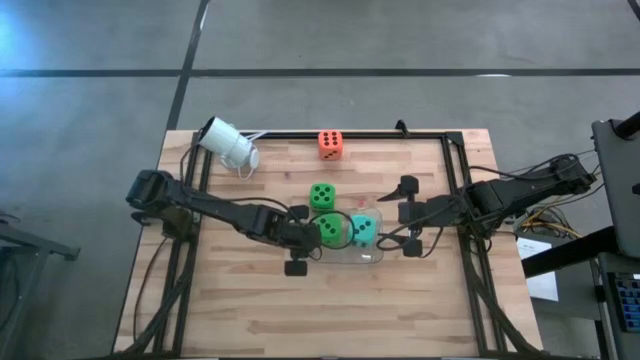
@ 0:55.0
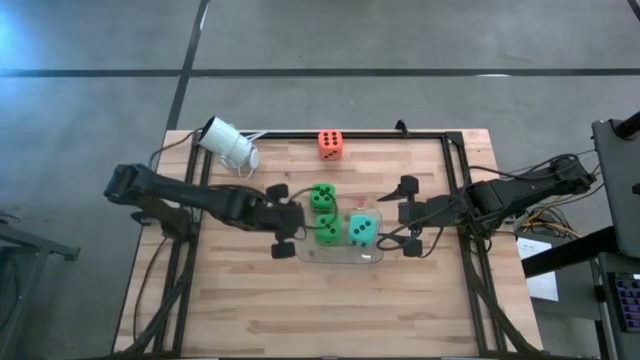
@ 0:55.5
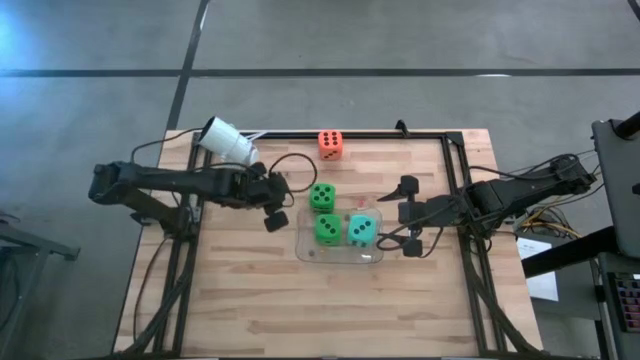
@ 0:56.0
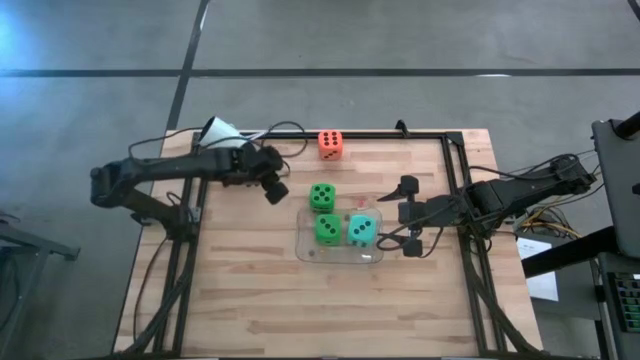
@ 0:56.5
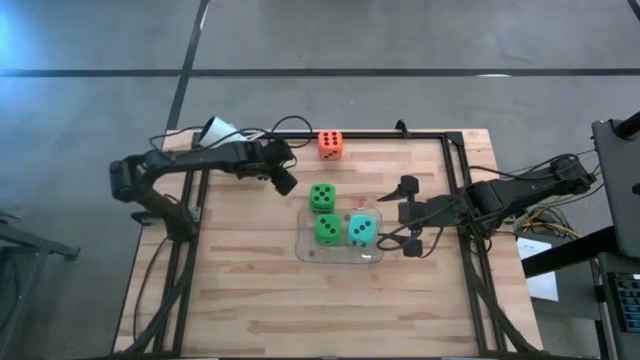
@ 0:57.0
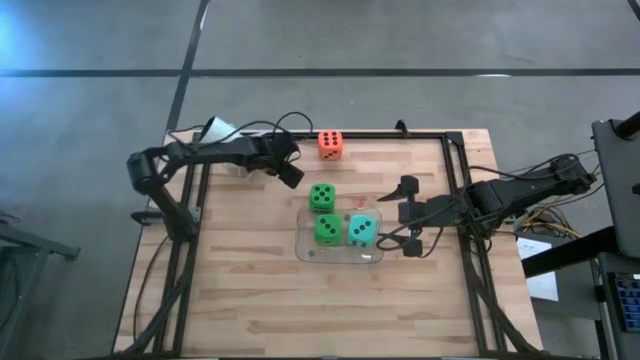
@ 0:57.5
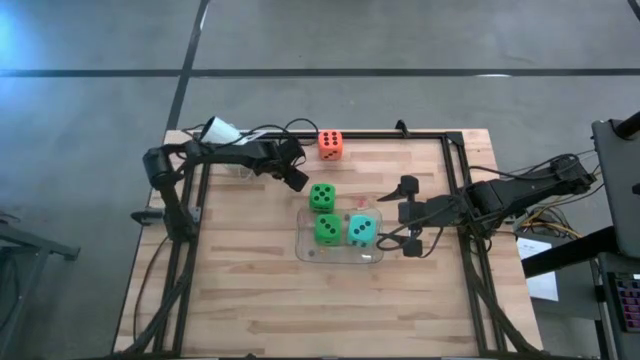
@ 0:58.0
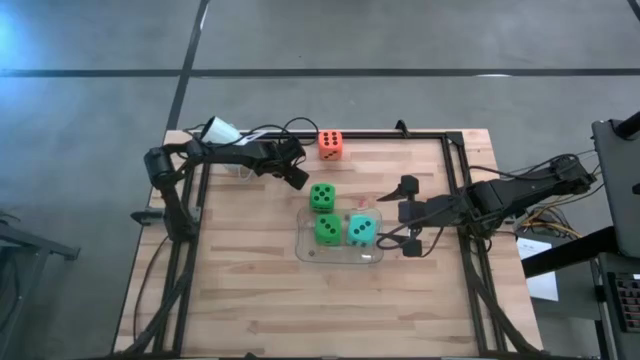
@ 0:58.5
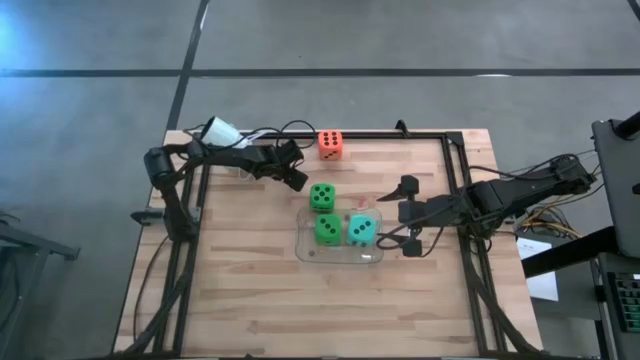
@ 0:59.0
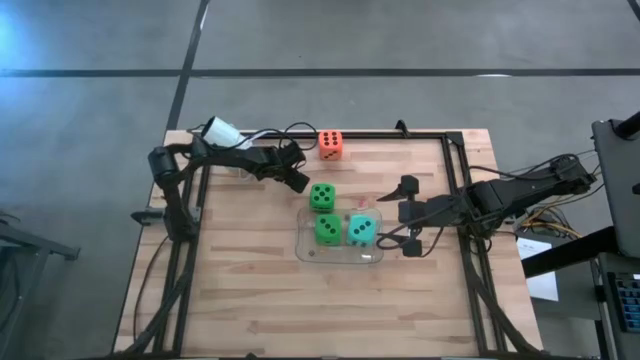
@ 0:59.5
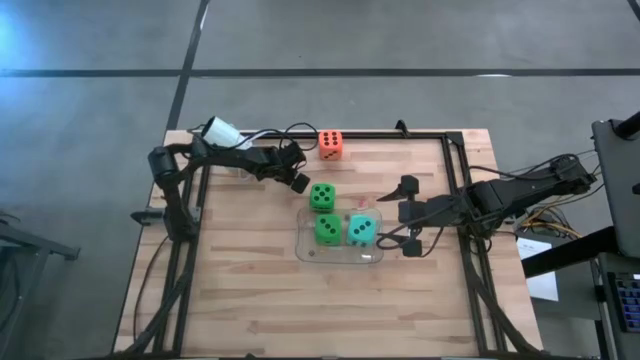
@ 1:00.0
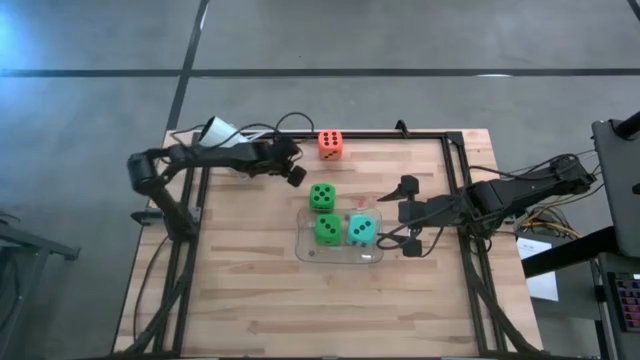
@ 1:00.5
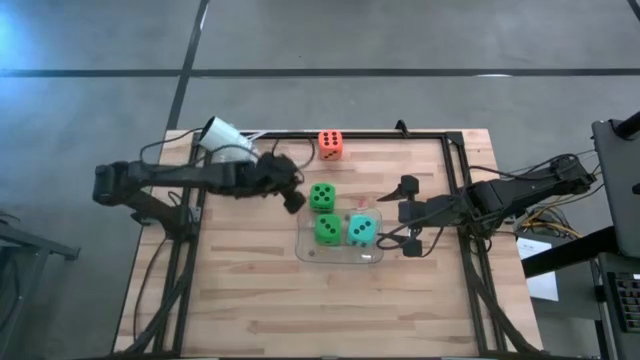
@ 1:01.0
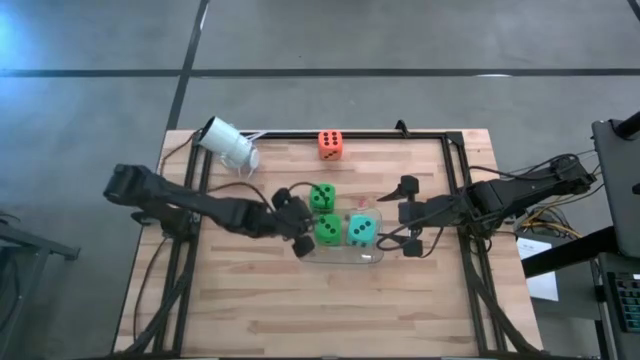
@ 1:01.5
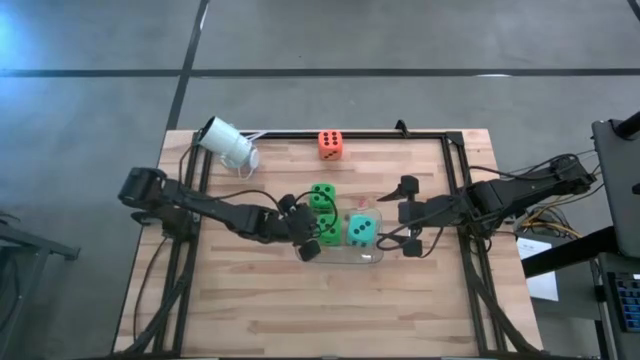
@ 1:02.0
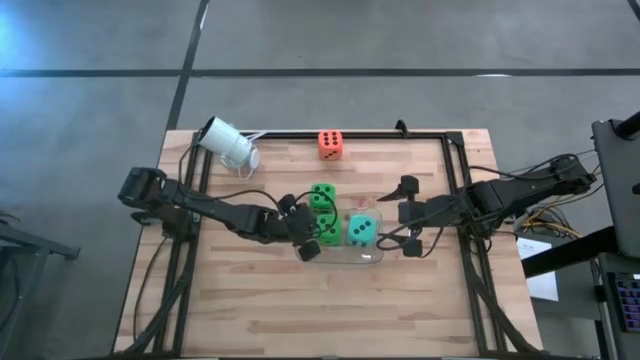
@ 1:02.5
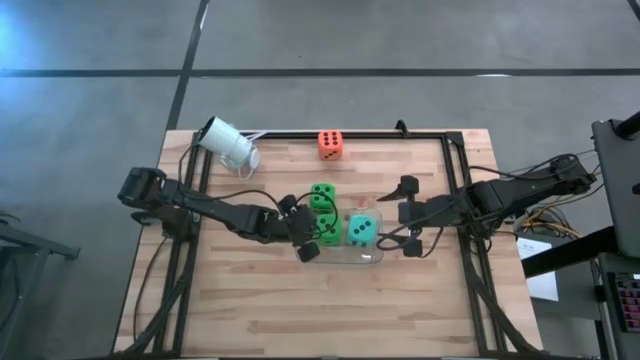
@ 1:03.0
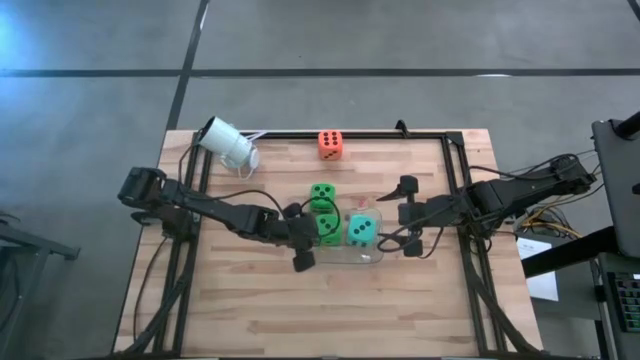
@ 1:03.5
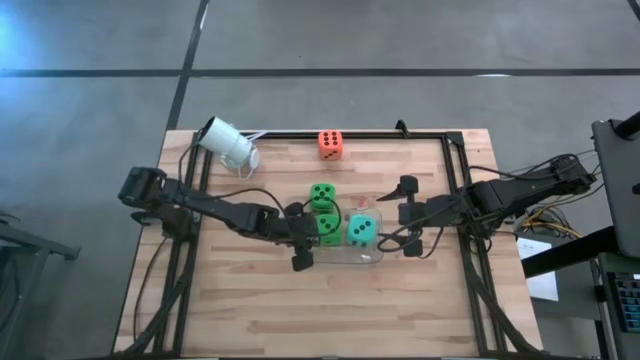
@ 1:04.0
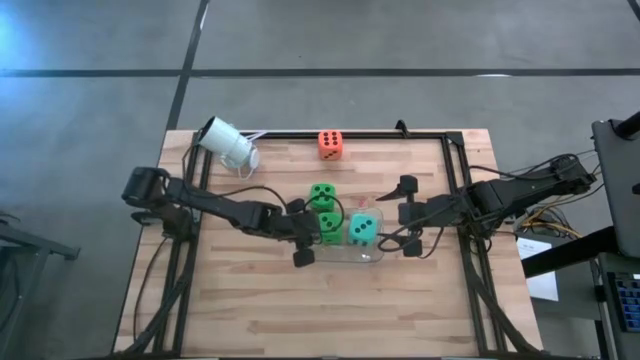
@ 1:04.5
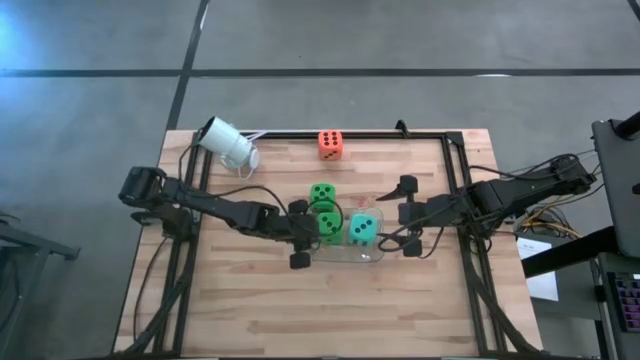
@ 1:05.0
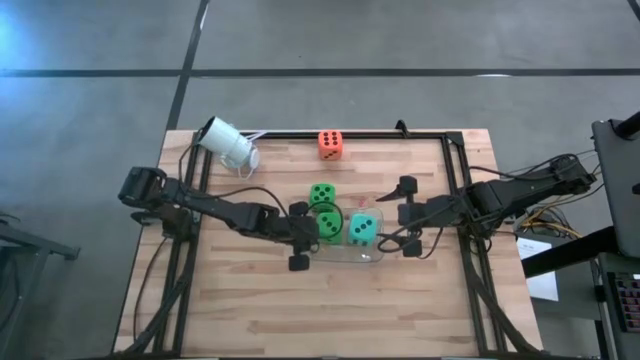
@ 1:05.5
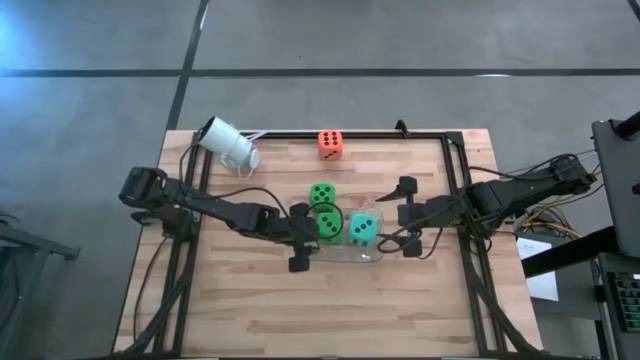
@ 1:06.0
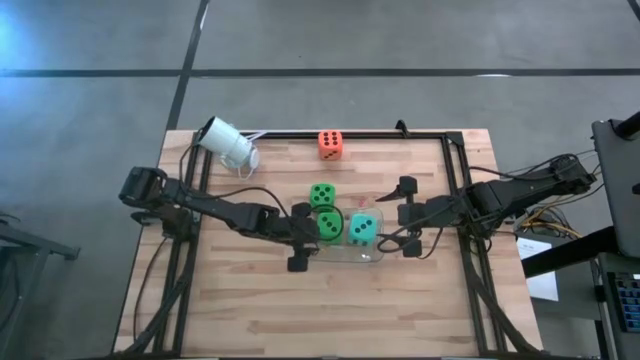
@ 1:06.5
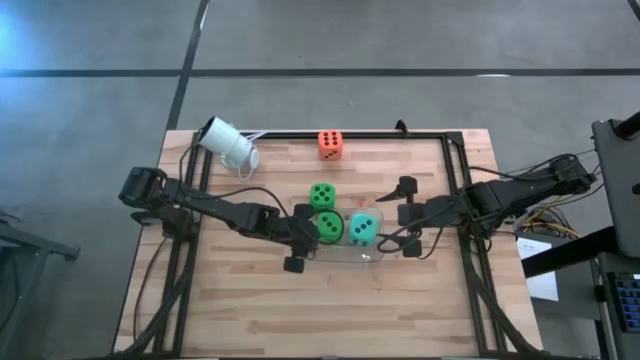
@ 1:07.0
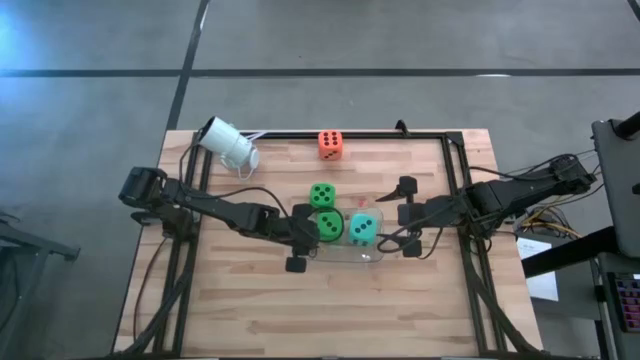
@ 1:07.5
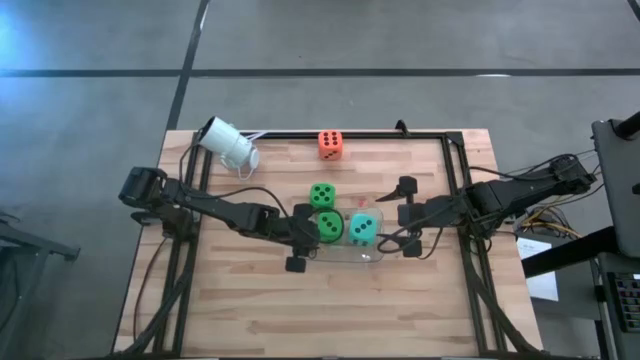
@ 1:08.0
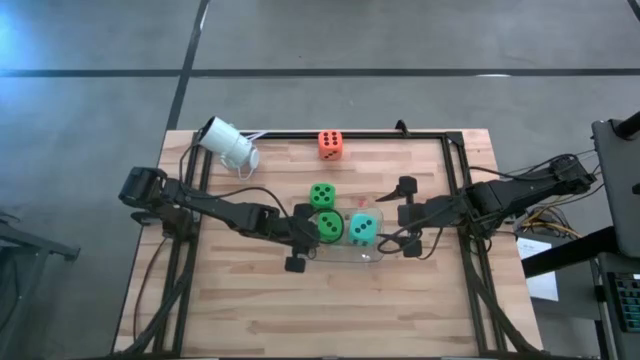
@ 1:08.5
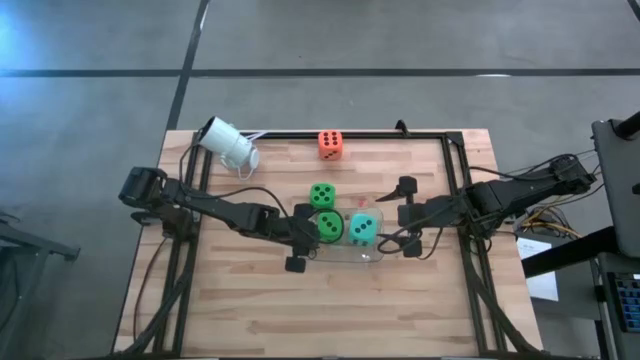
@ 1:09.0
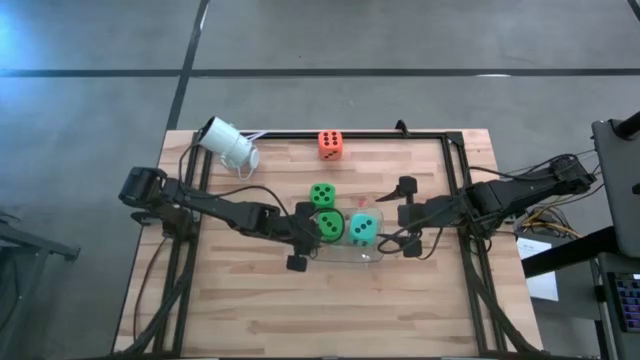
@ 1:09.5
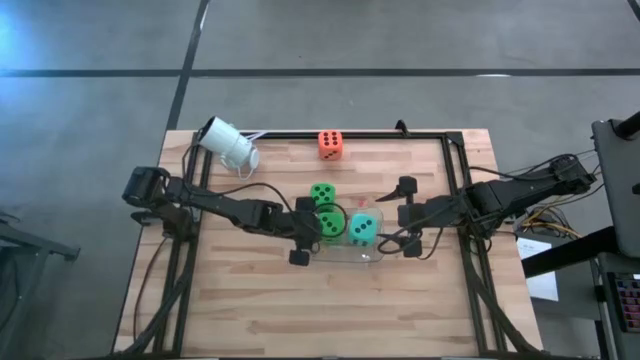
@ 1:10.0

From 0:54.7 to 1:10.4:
Task: Pick & Place Dice
Put the small violet die into the transparent bin

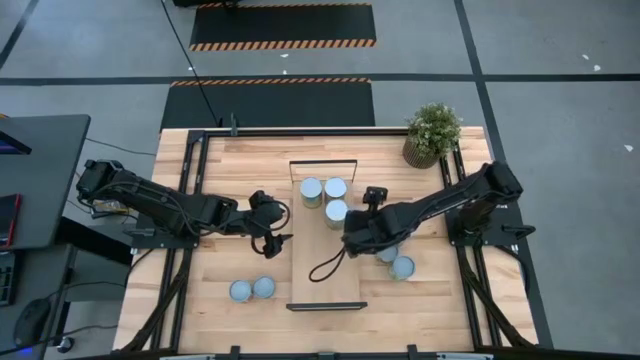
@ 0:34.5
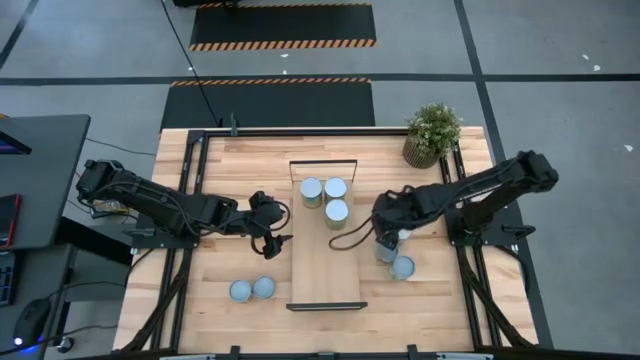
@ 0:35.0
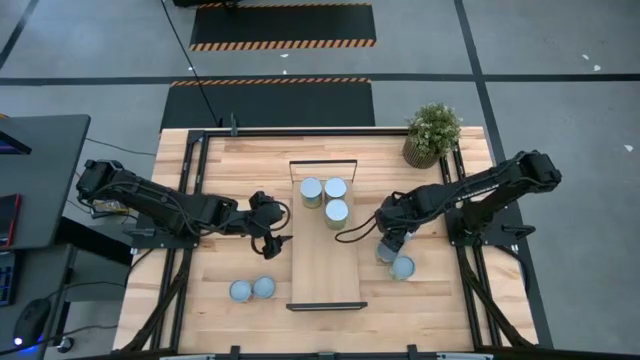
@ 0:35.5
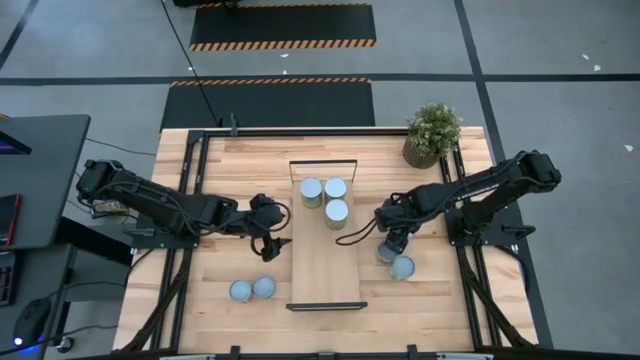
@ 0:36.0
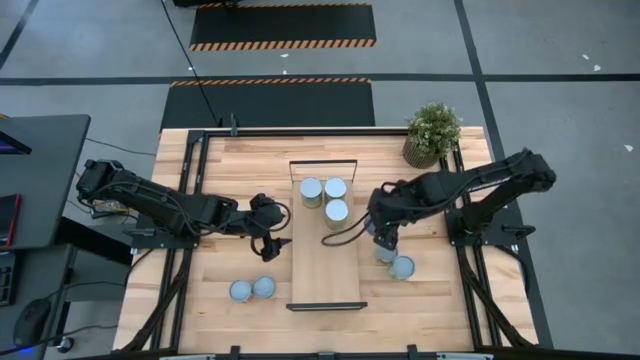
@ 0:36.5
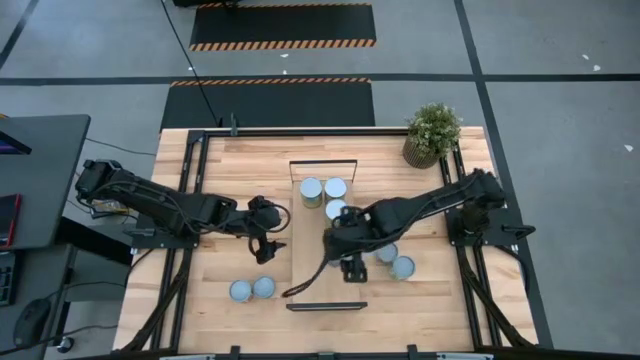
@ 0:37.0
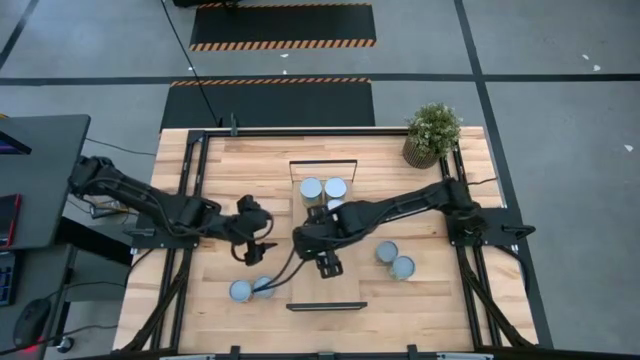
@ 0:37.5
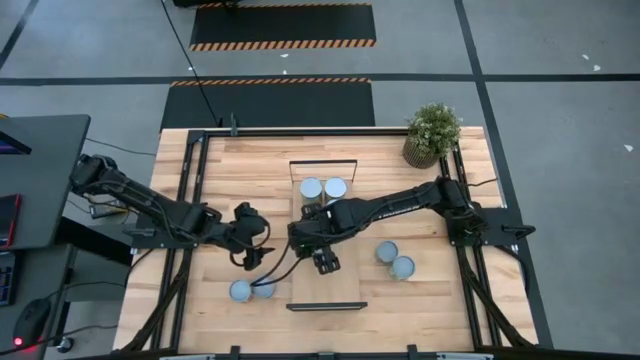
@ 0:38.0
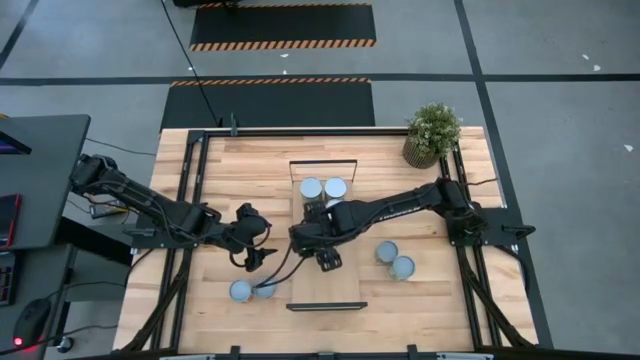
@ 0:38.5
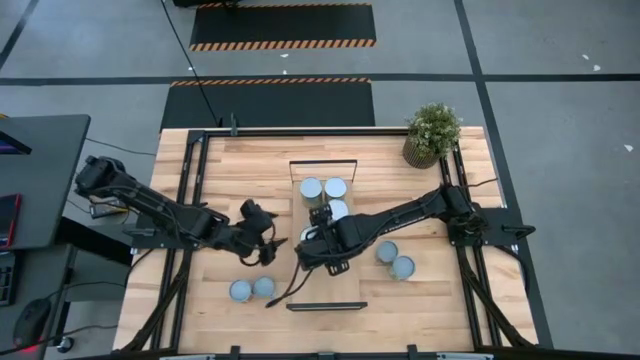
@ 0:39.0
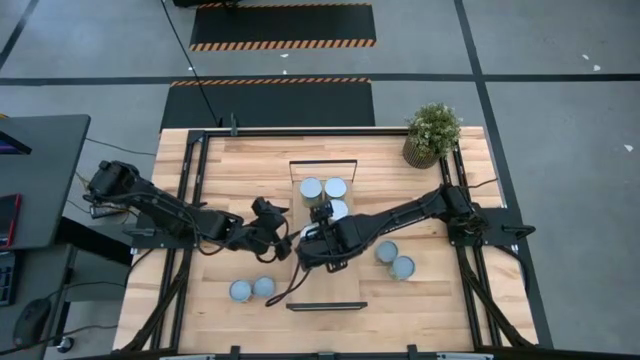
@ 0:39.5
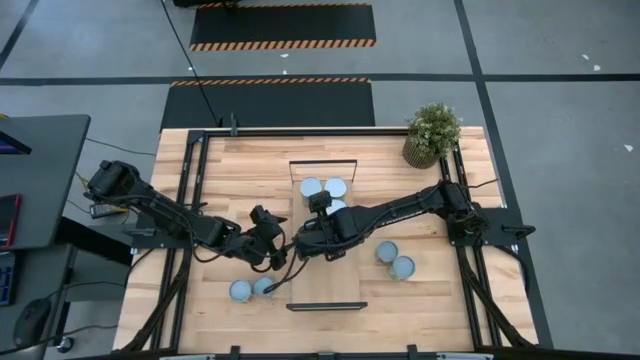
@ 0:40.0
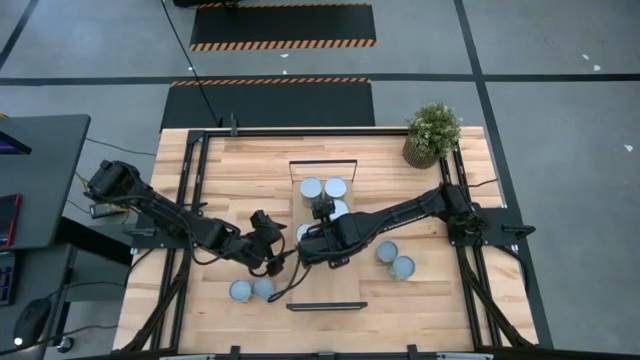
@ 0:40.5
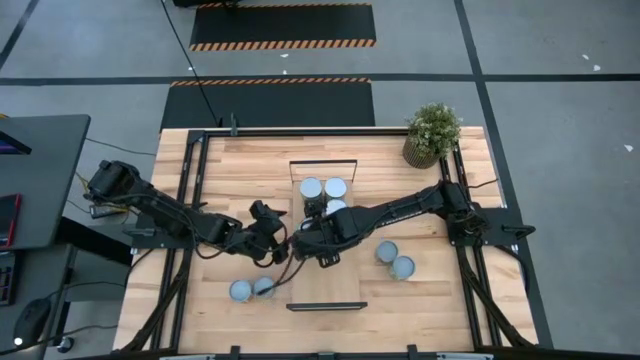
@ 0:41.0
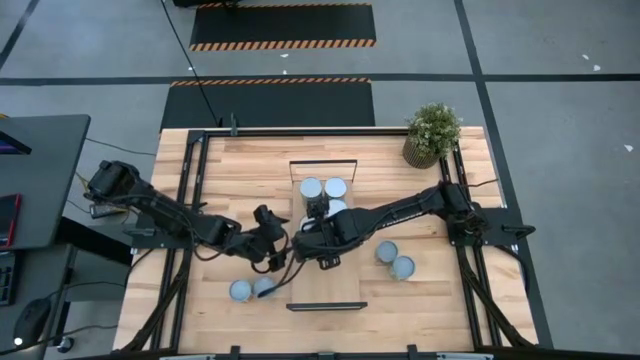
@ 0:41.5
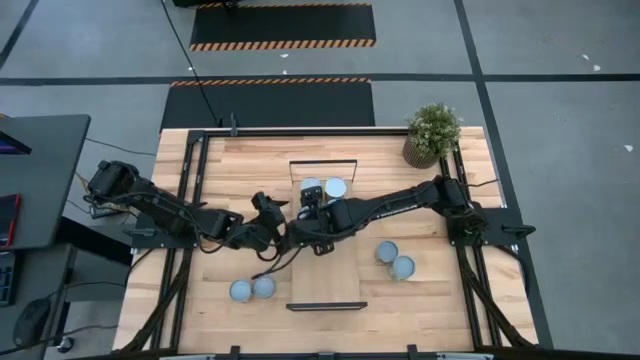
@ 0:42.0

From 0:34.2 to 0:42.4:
Task: Pick and place cans onto a shelf
Put the canned peas on the shelf
